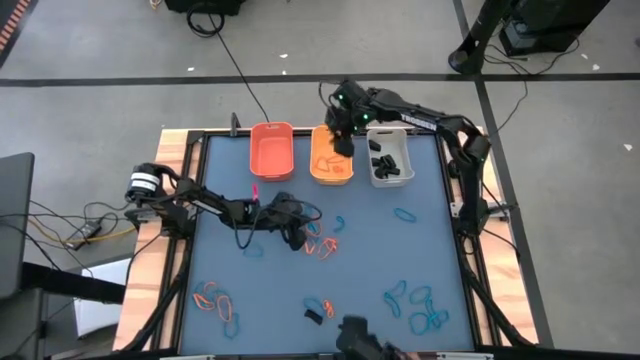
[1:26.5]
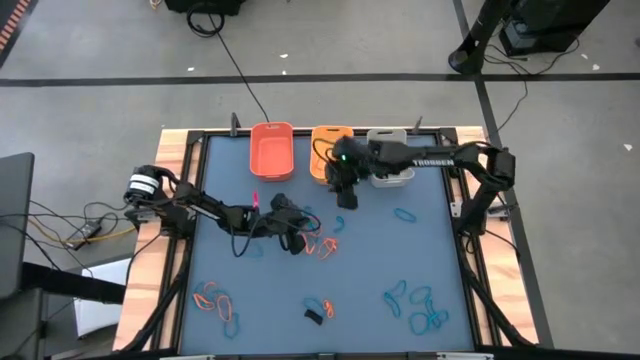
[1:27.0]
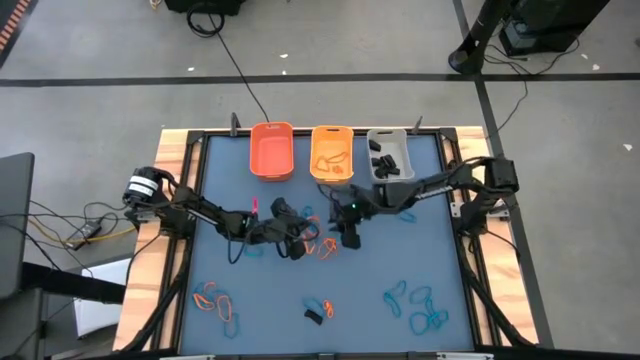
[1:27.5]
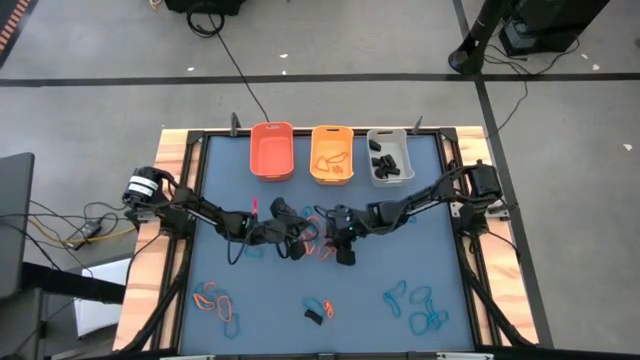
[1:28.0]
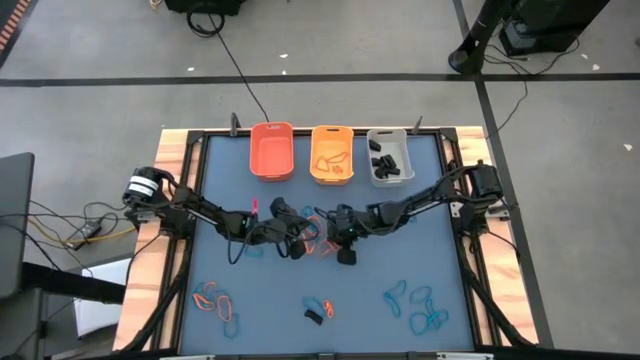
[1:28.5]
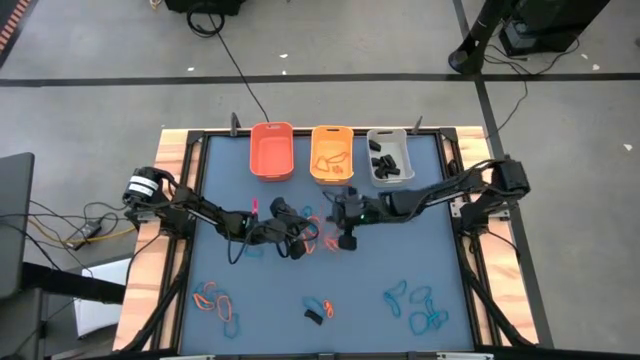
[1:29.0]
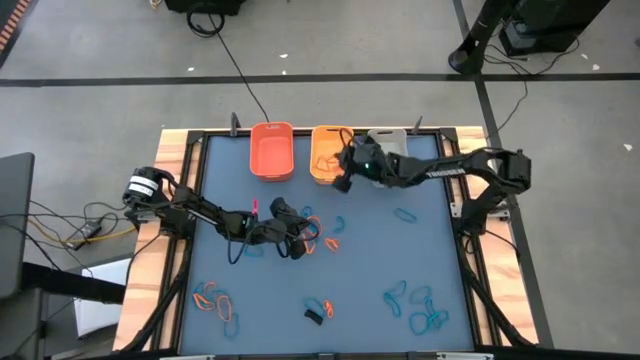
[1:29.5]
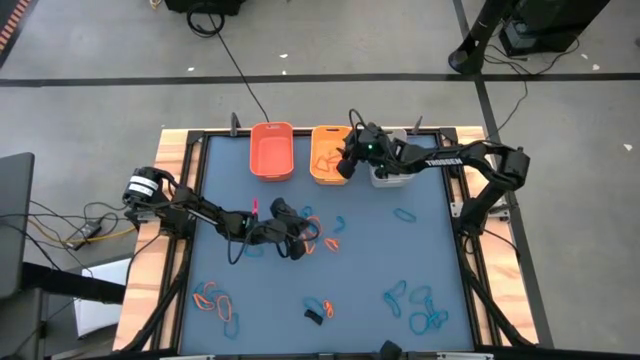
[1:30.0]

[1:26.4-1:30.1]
Task: Sort rubber bands into baskets
Put the orange rubber band into the yellow bin

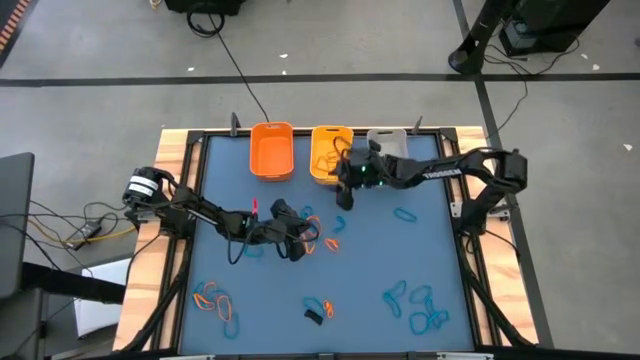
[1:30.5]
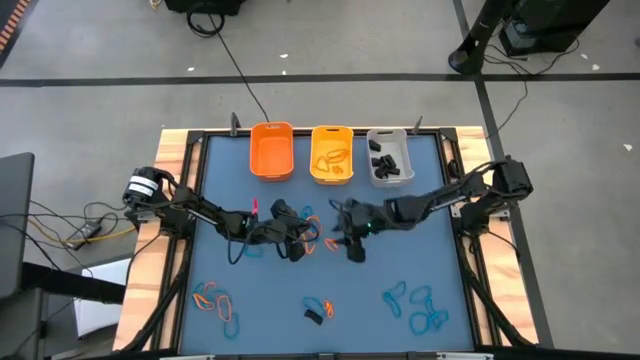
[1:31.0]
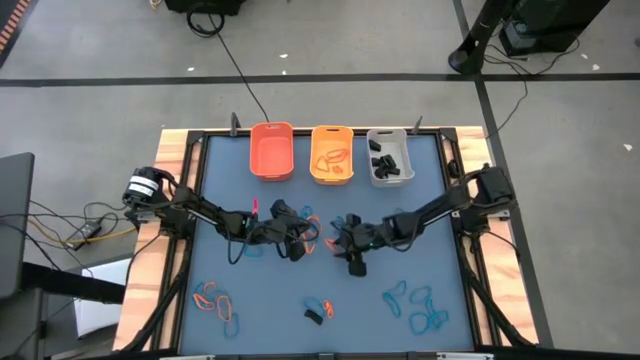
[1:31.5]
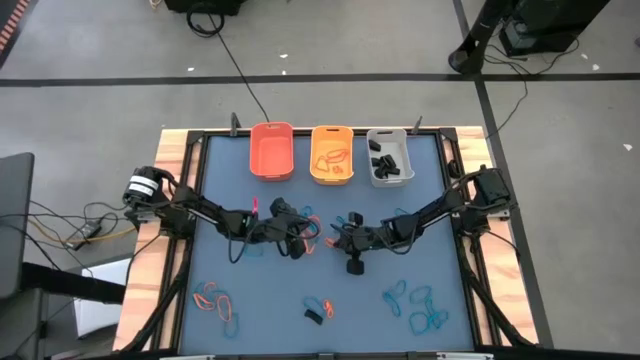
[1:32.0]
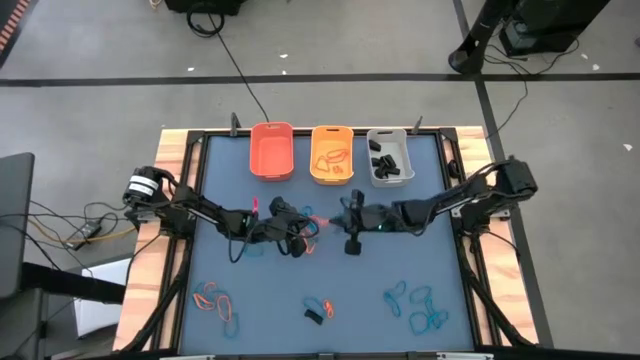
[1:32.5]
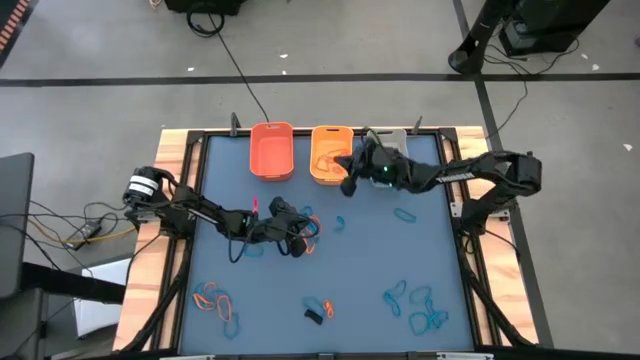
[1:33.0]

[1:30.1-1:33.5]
Put the orange rubber band into the yellow bin

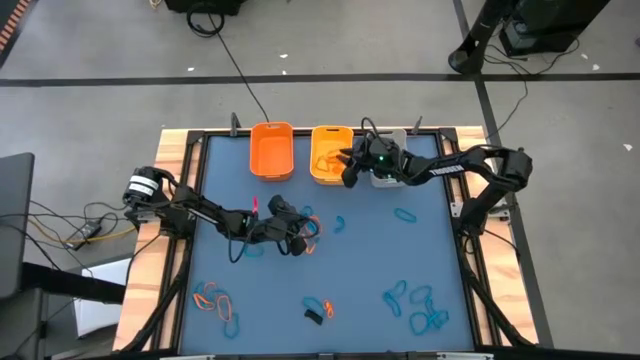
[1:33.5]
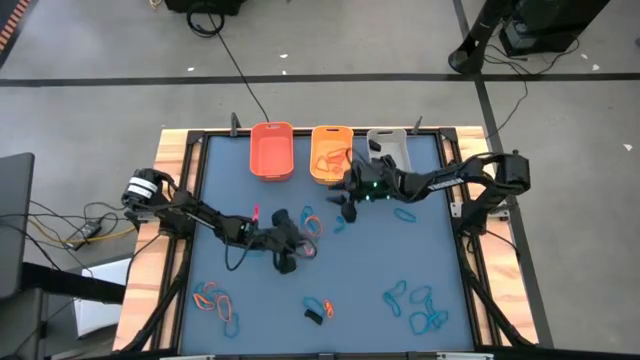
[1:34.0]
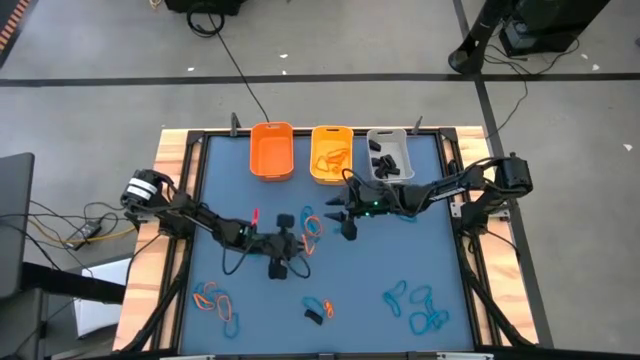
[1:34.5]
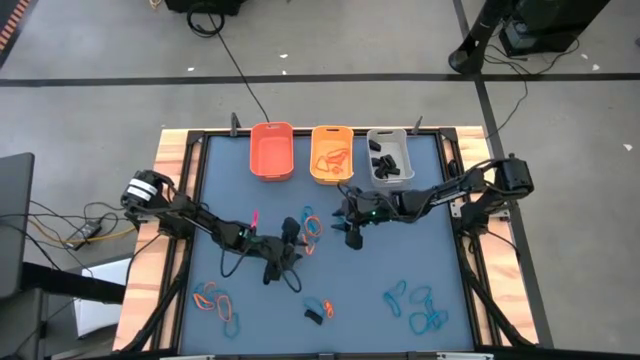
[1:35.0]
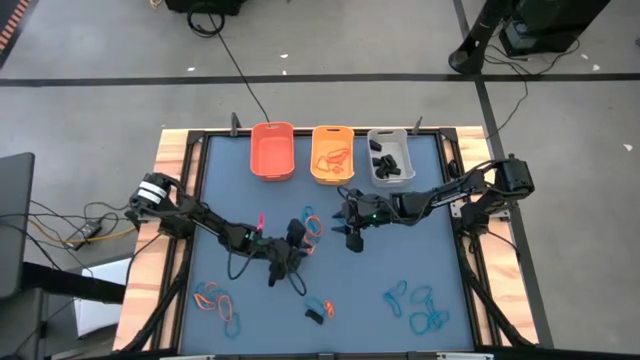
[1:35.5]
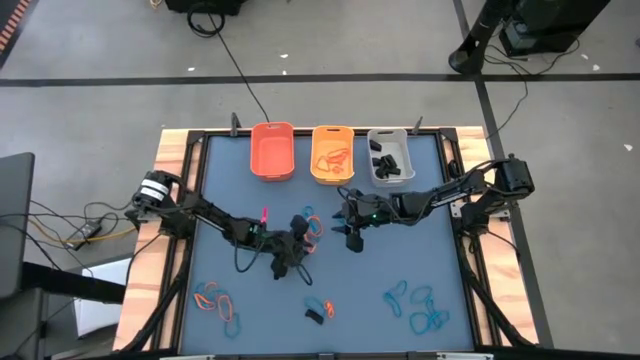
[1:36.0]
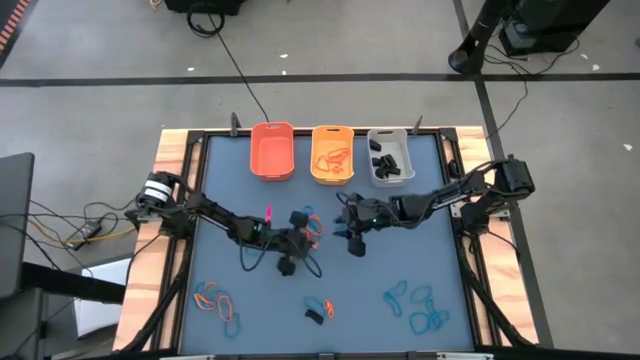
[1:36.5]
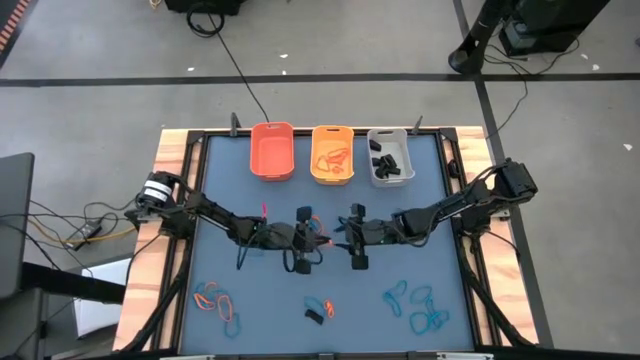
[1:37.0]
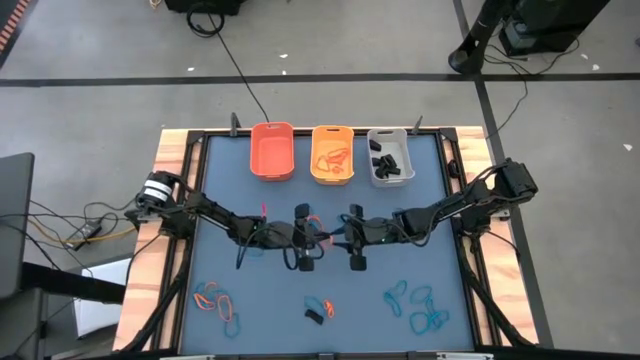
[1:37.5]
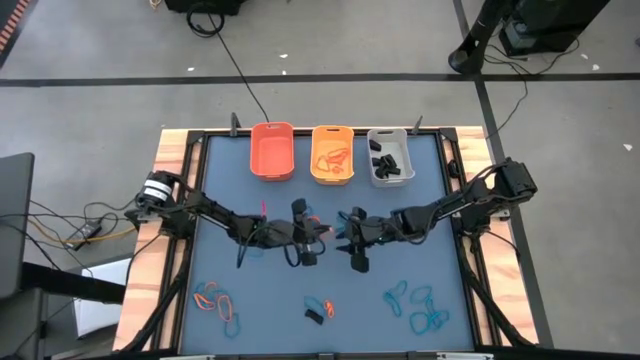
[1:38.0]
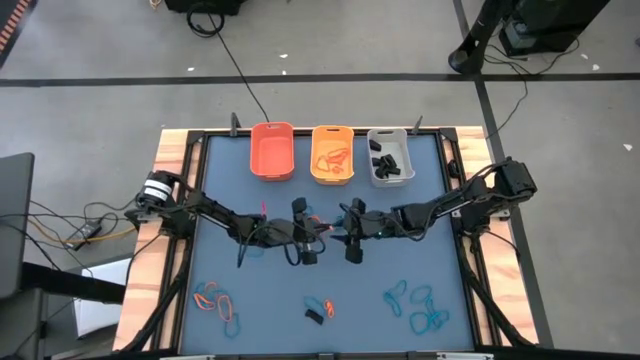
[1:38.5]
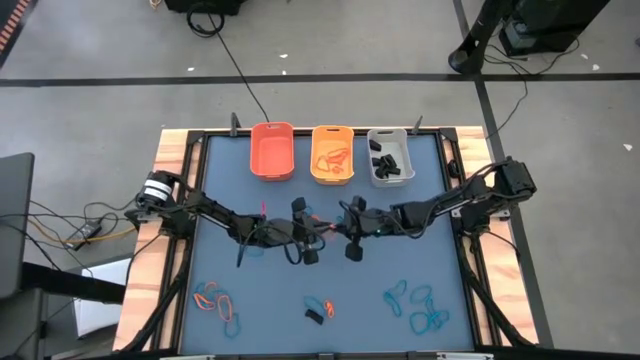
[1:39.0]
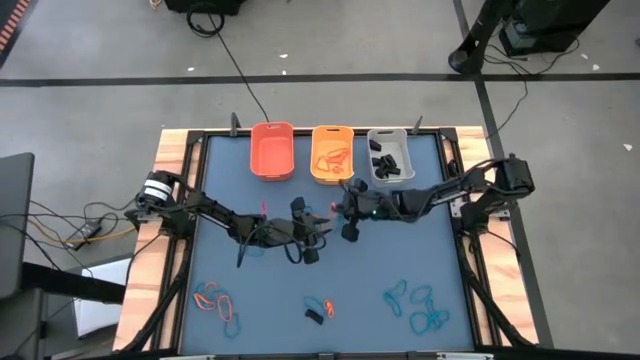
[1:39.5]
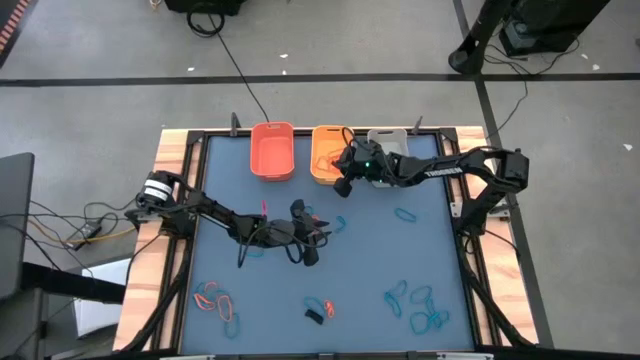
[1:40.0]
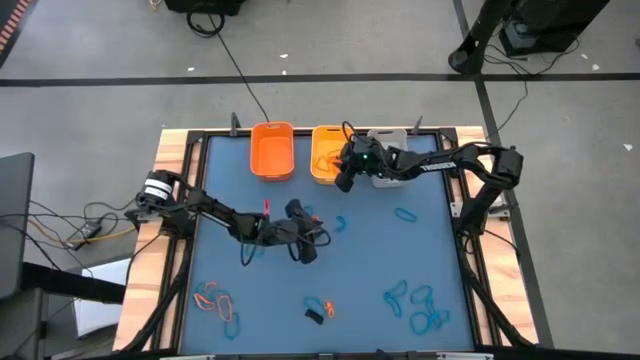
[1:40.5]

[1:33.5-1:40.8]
Put the orange rubber band into the yellow bin

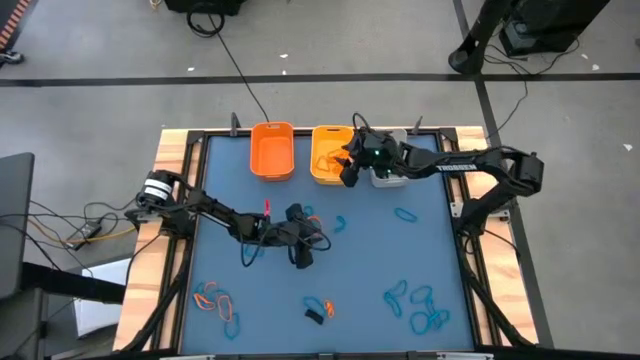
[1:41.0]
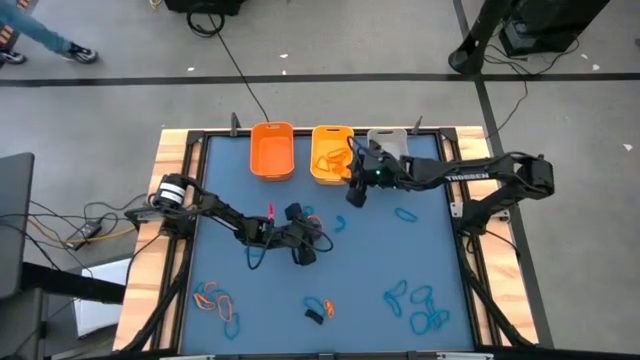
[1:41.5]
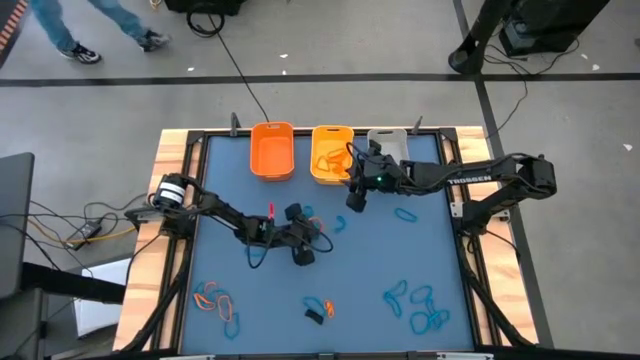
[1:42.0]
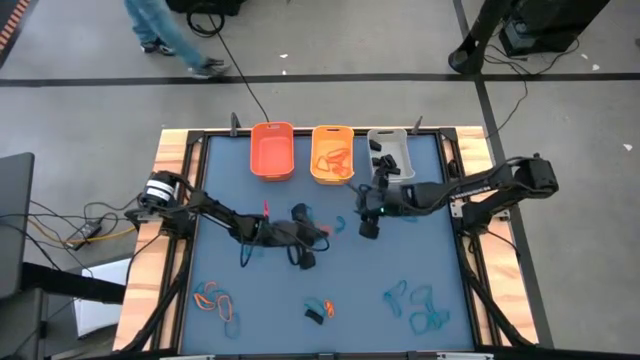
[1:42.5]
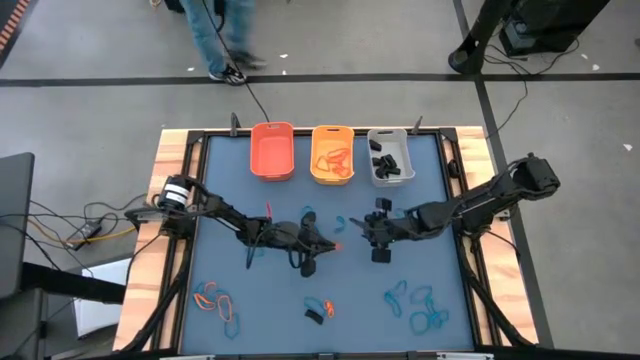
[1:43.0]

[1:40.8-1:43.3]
Put the orange rubber band into the yellow bin

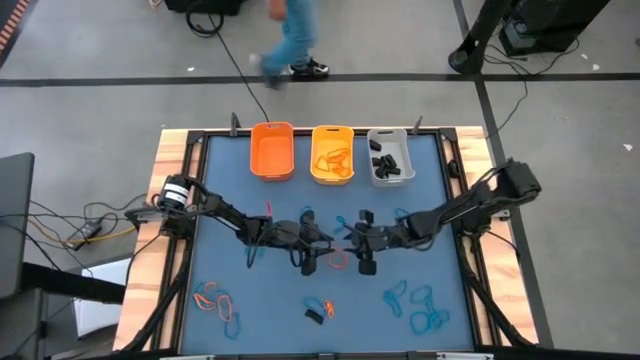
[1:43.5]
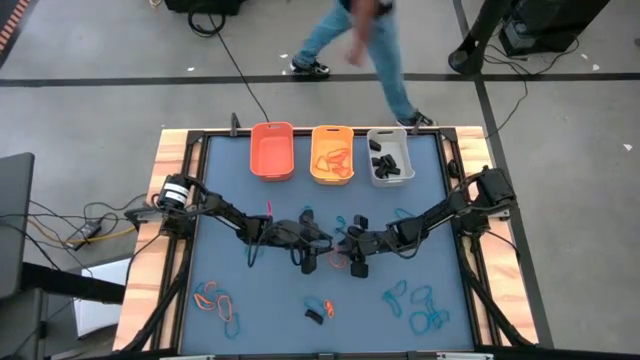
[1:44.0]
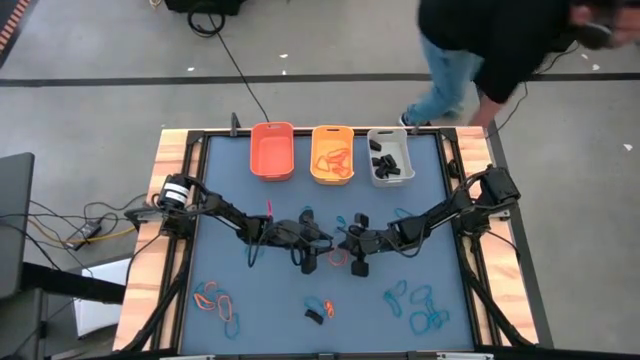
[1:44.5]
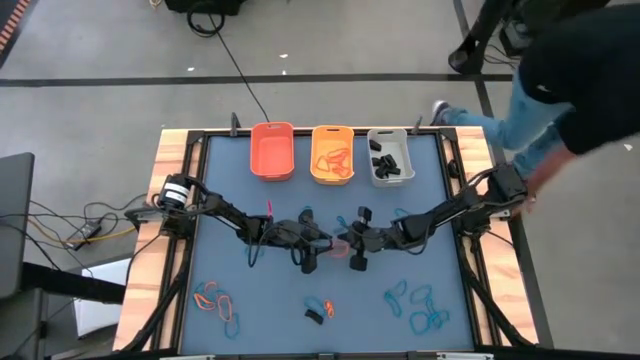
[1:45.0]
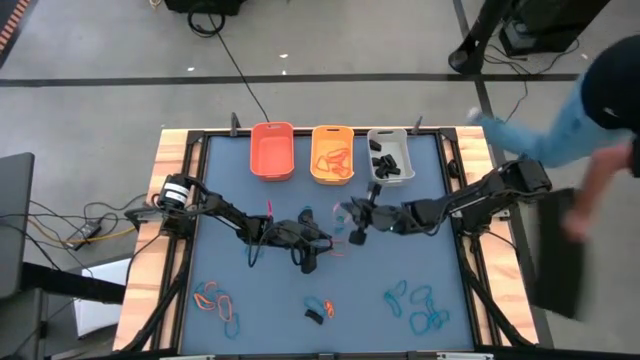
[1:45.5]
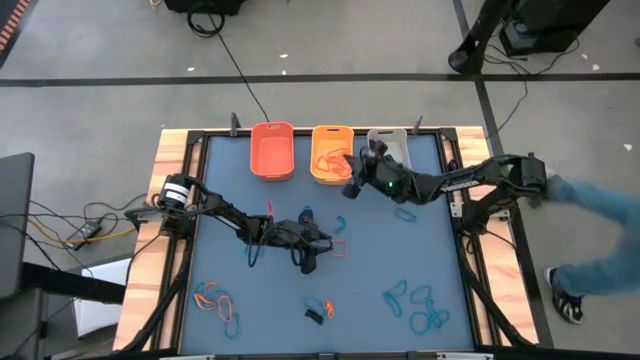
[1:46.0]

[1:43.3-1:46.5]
Put the orange rubber band into the yellow bin

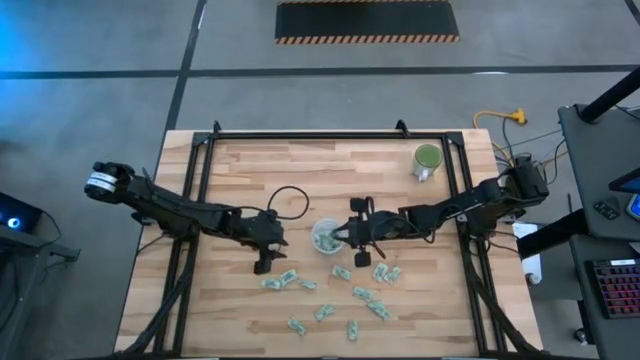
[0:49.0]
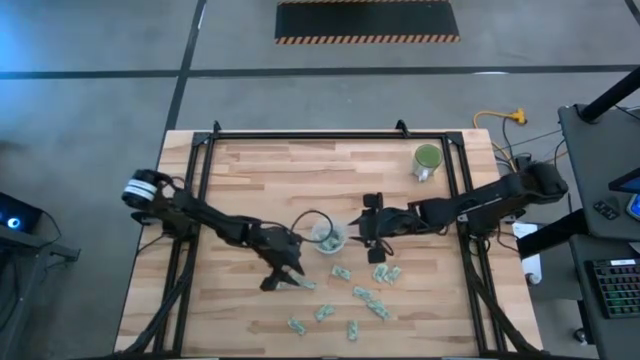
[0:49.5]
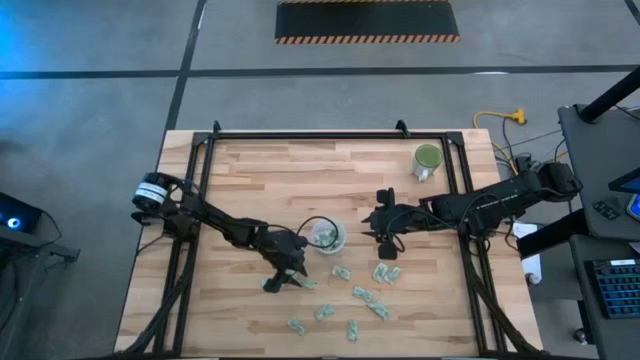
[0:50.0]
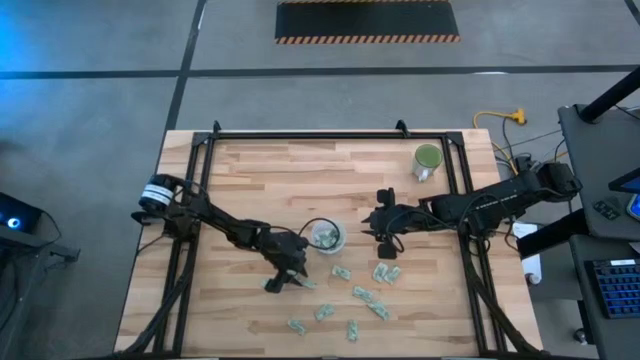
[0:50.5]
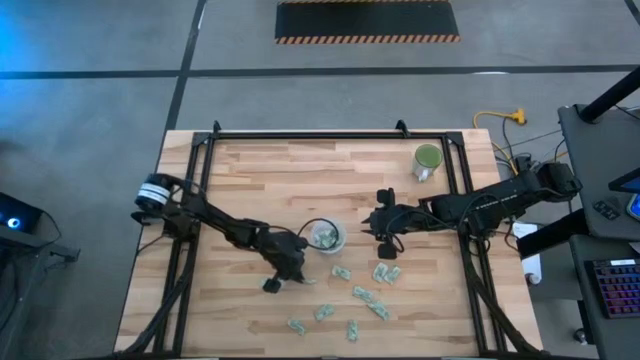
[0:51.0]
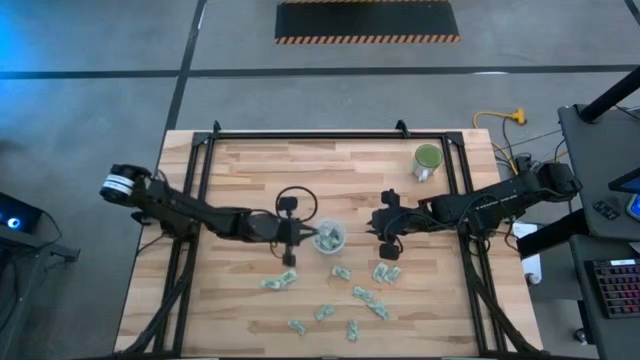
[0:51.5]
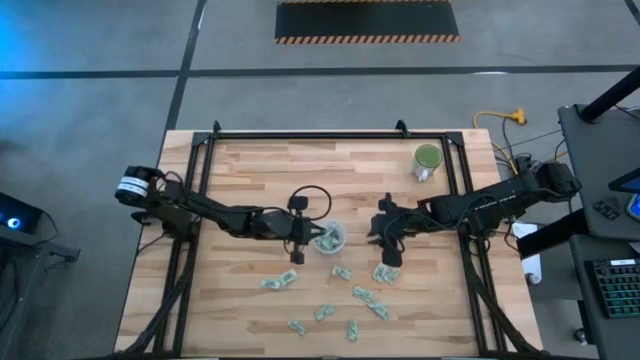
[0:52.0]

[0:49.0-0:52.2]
Task: Pick and place Stevia / Truvia into bins
Put the light green stevia packet into the transparent container
